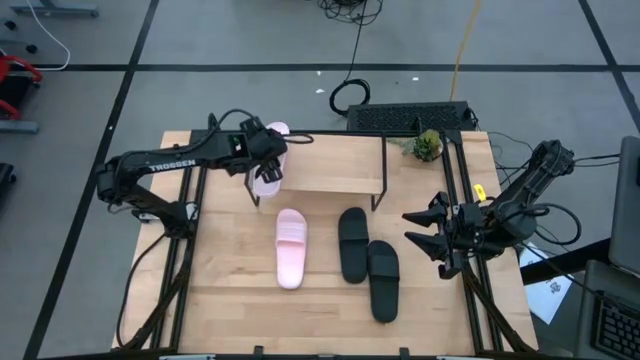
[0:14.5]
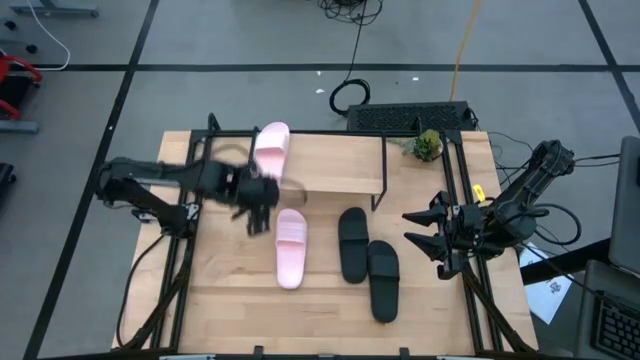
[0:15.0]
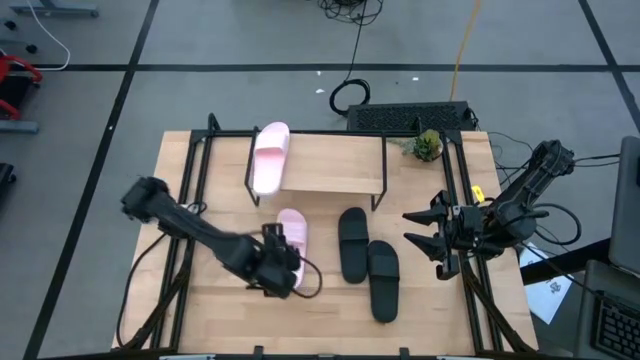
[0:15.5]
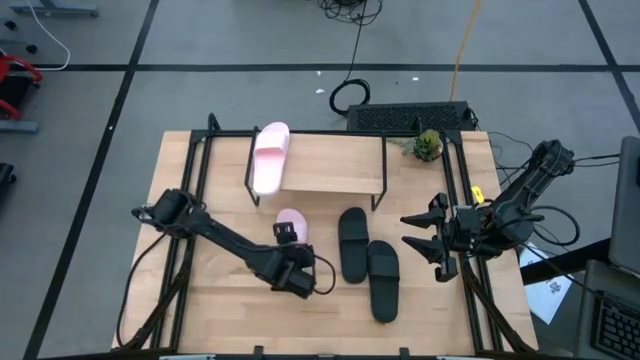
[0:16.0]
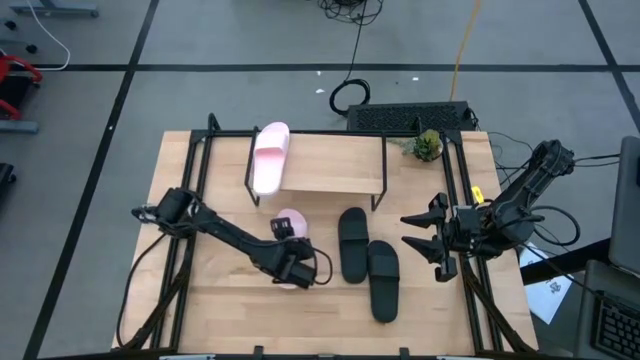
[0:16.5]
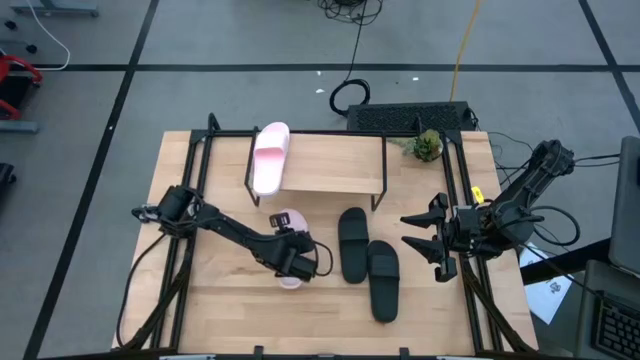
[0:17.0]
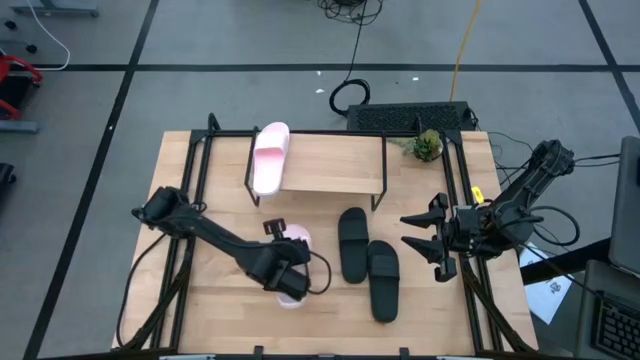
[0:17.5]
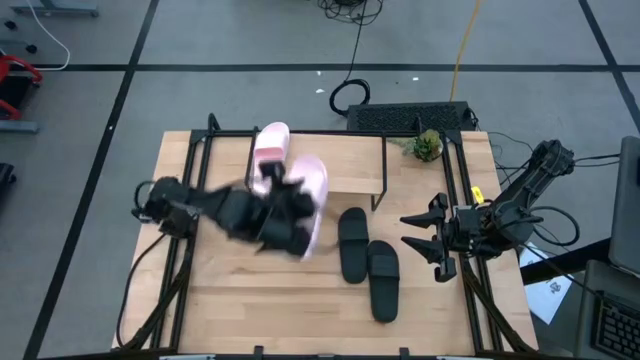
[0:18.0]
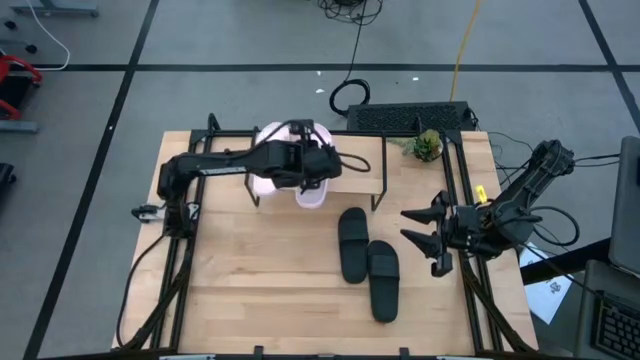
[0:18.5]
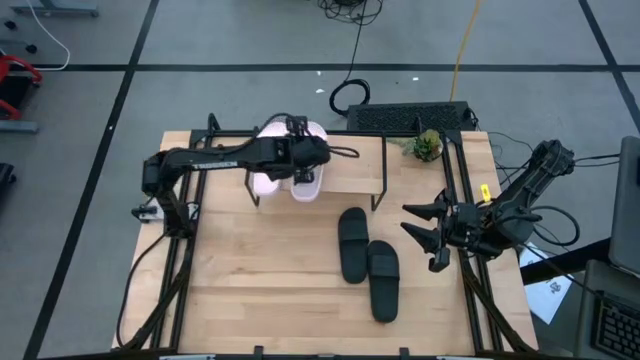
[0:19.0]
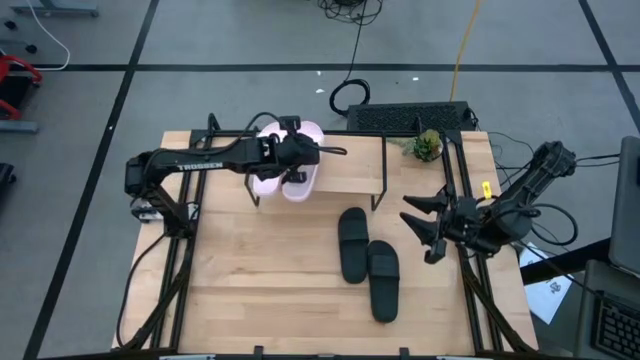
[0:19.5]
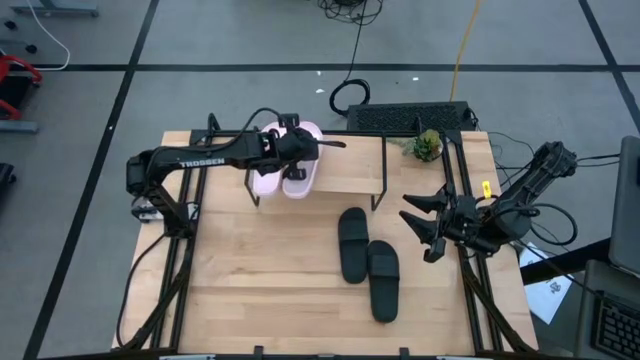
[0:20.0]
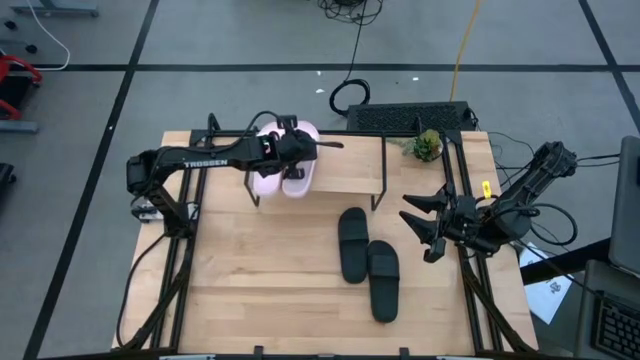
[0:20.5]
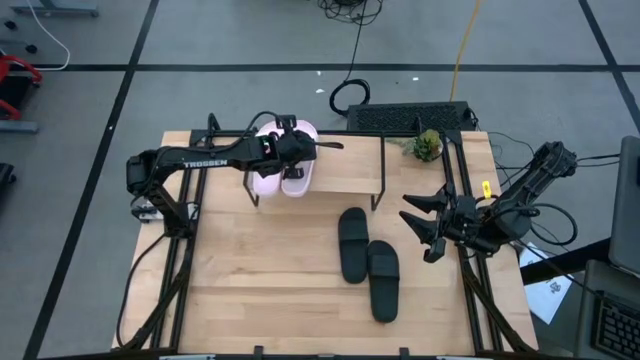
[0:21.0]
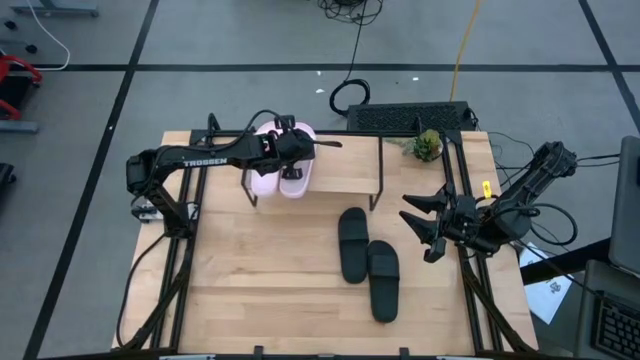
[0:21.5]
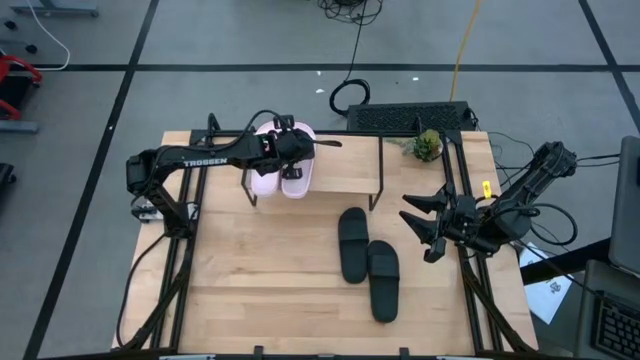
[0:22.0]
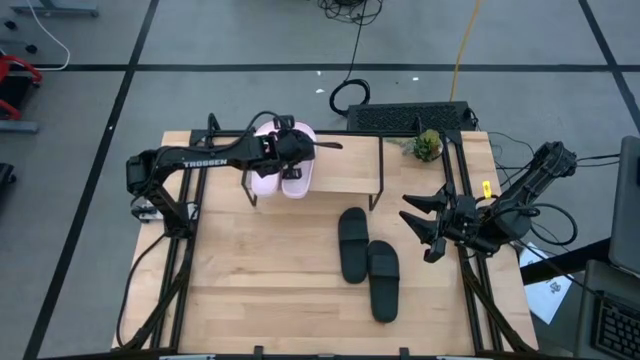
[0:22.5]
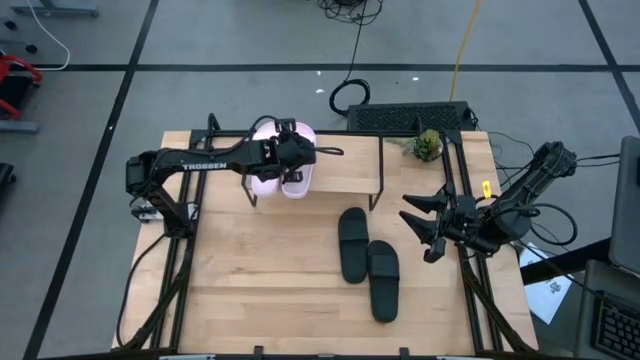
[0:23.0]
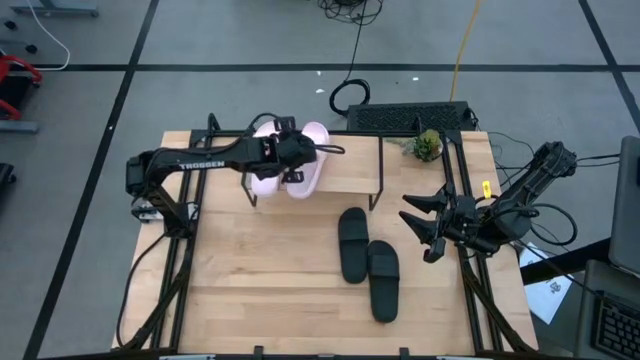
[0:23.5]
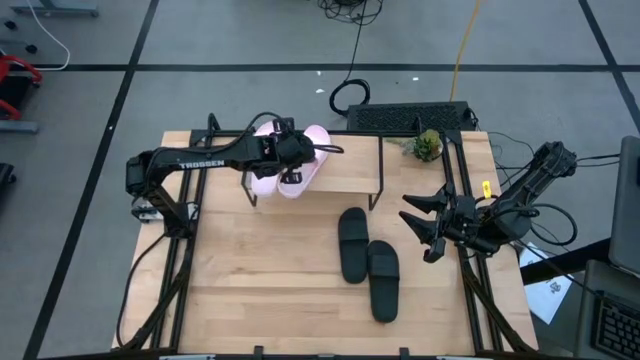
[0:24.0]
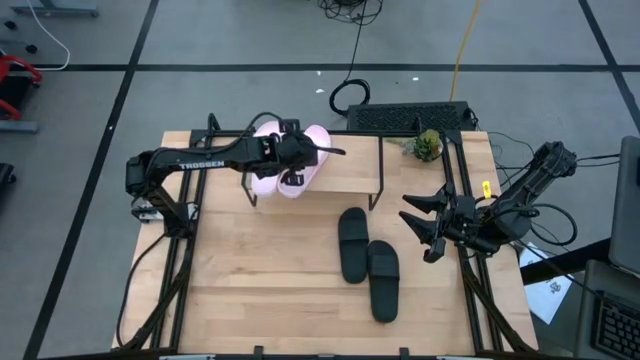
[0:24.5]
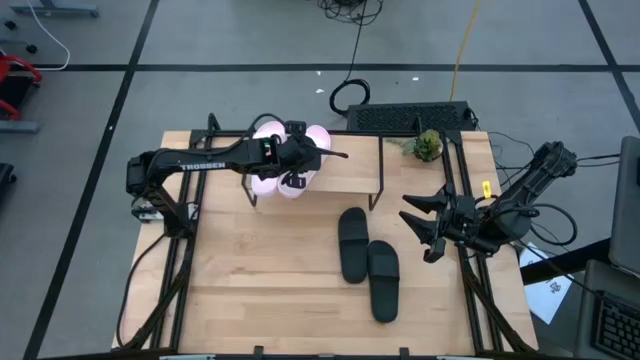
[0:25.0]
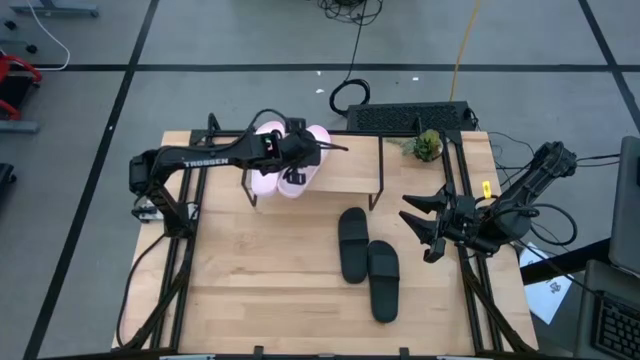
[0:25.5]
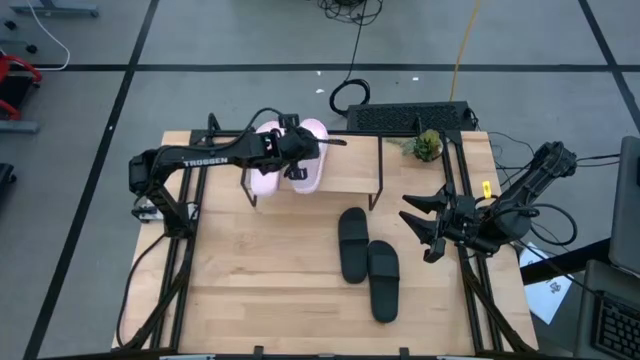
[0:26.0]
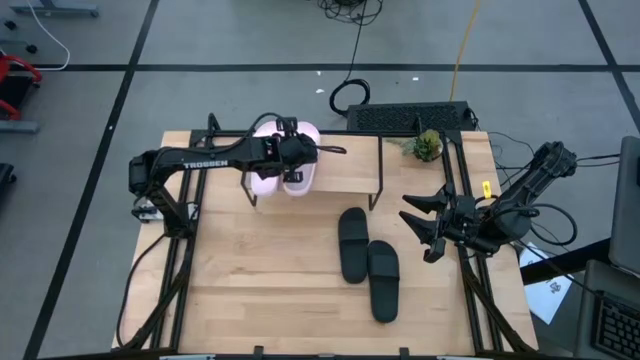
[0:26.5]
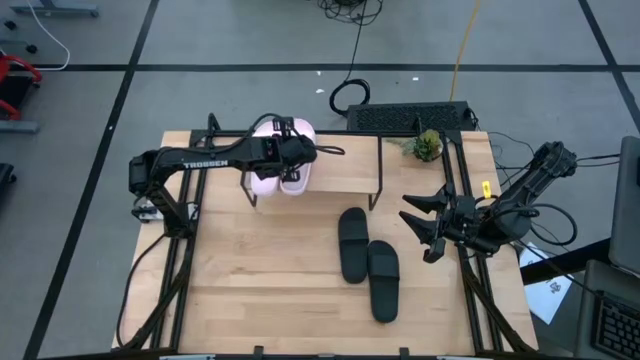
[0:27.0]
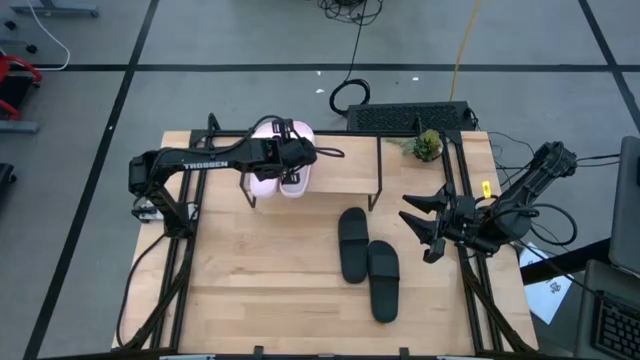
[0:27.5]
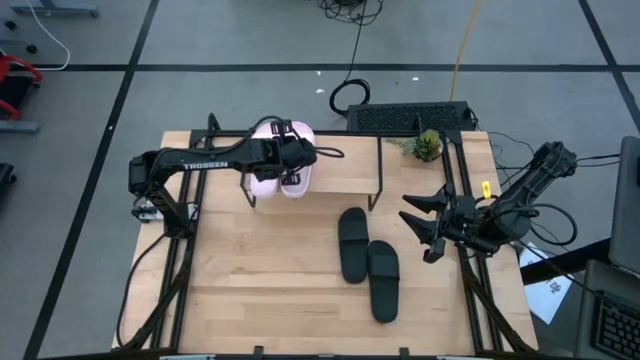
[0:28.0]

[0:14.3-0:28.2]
Task: Pick and place slides into the shelf
Put the pink slides on the shelf

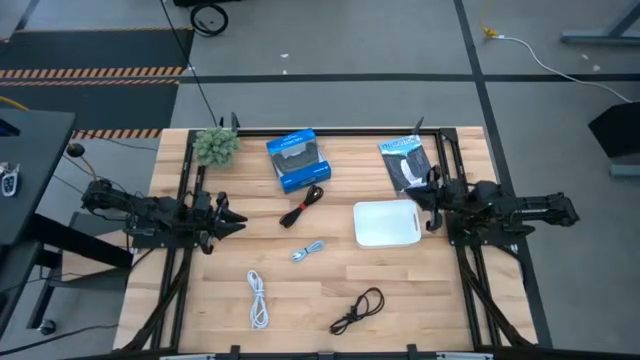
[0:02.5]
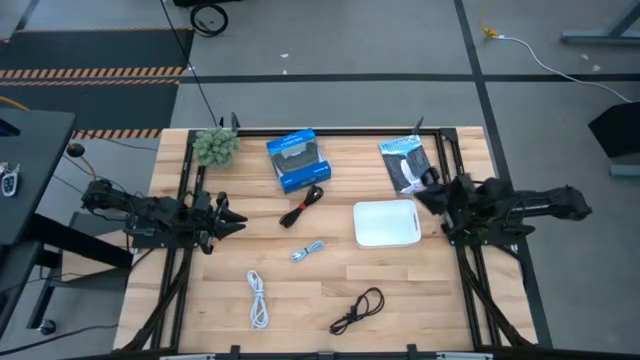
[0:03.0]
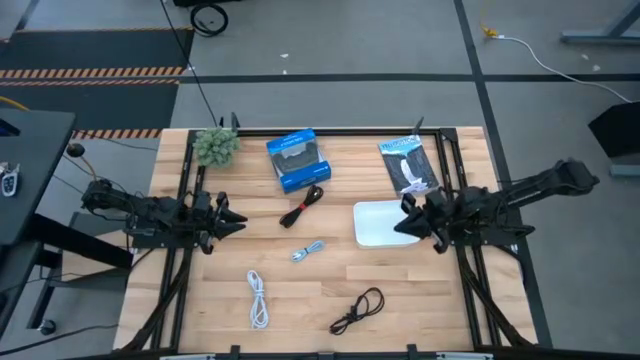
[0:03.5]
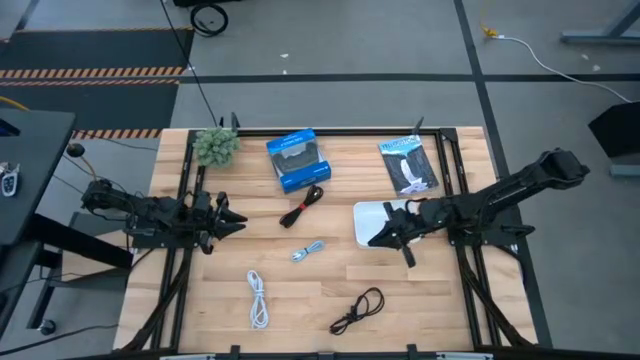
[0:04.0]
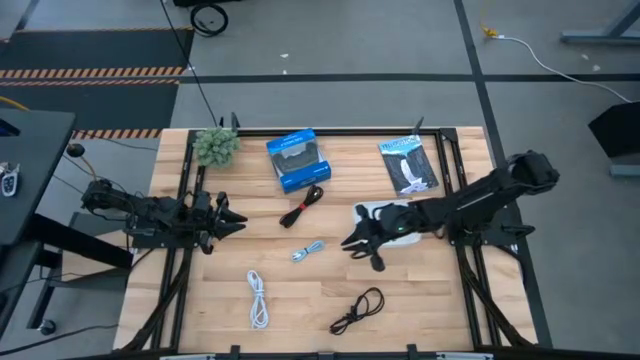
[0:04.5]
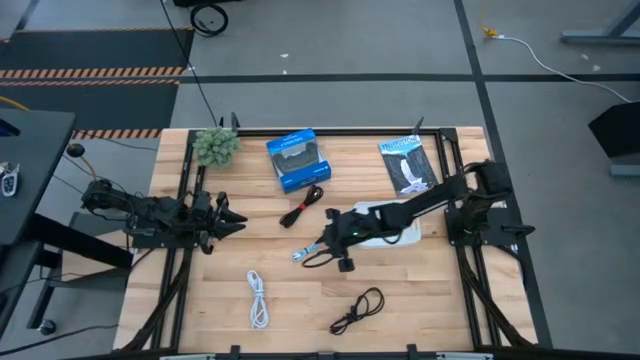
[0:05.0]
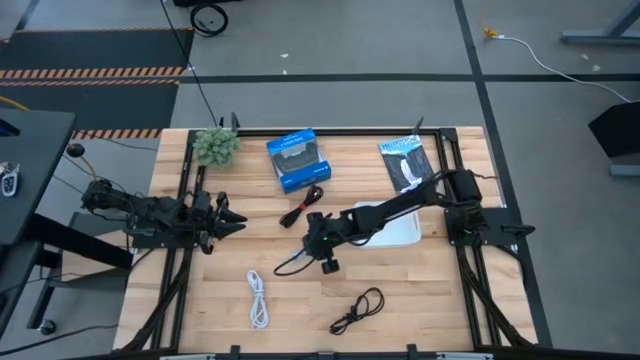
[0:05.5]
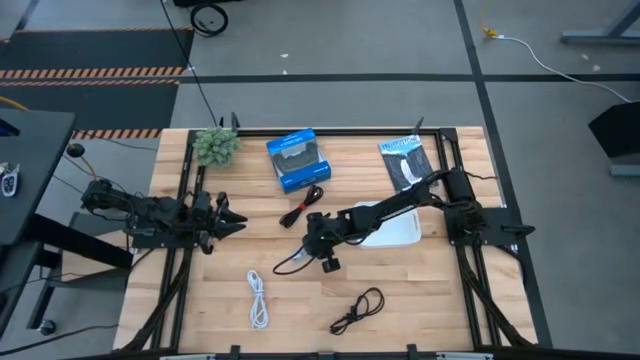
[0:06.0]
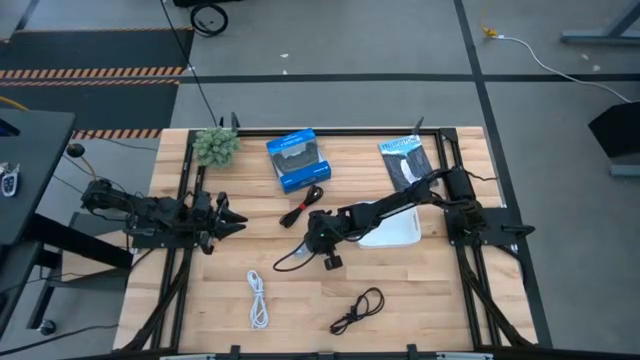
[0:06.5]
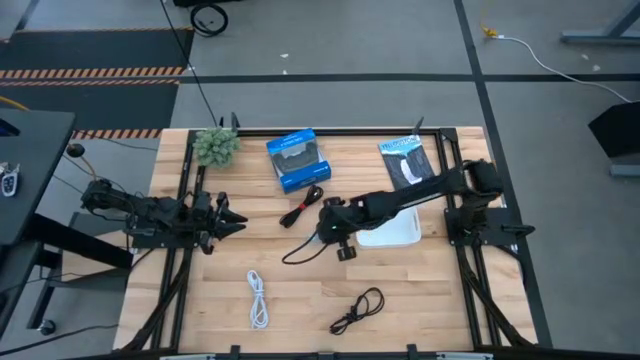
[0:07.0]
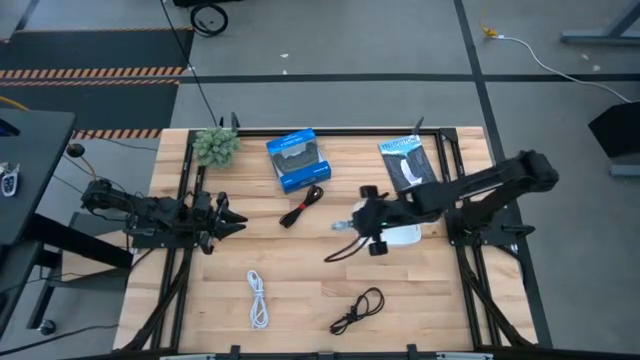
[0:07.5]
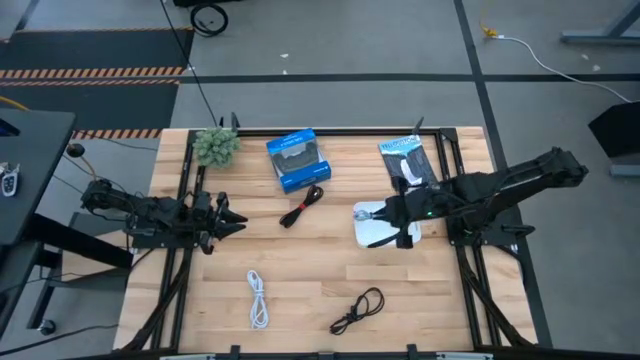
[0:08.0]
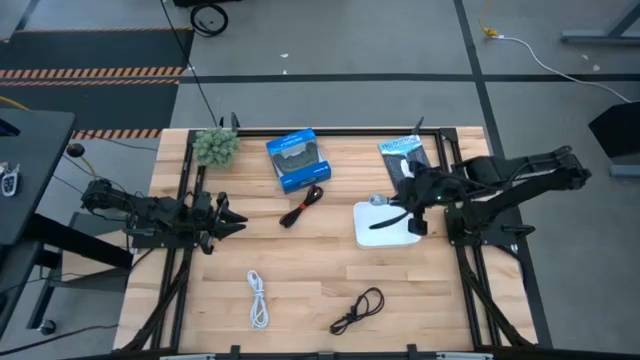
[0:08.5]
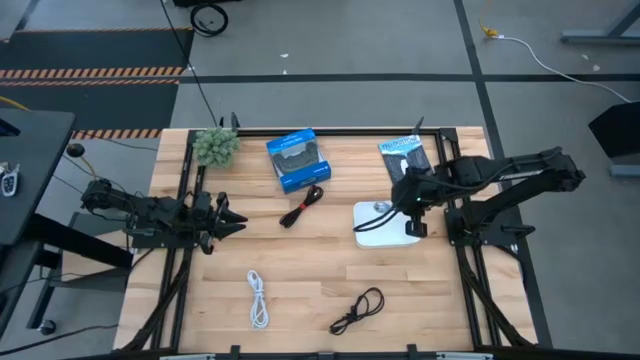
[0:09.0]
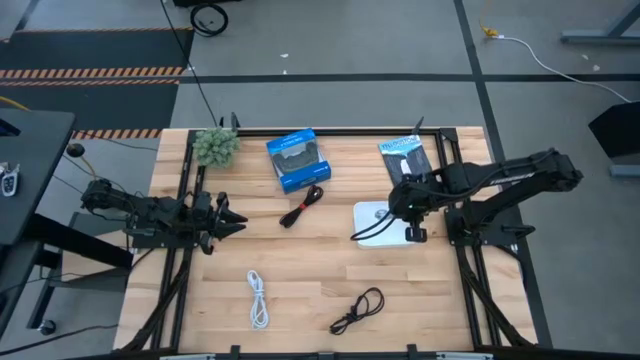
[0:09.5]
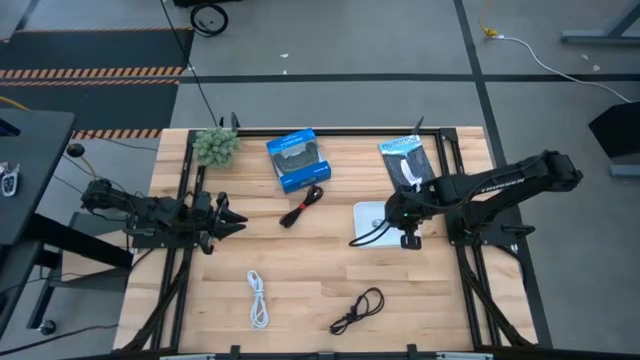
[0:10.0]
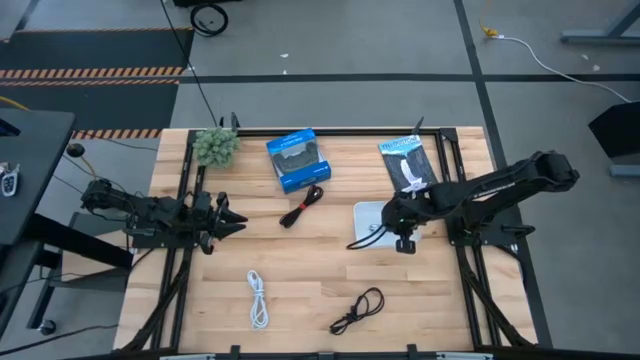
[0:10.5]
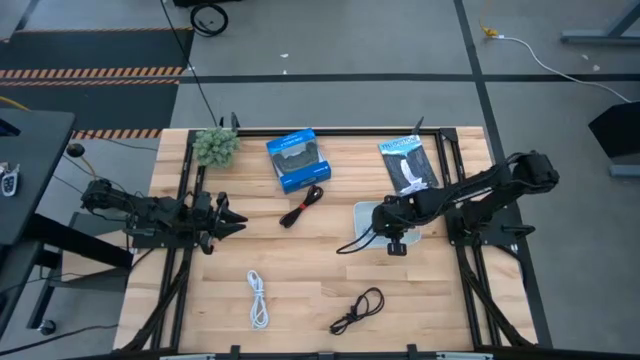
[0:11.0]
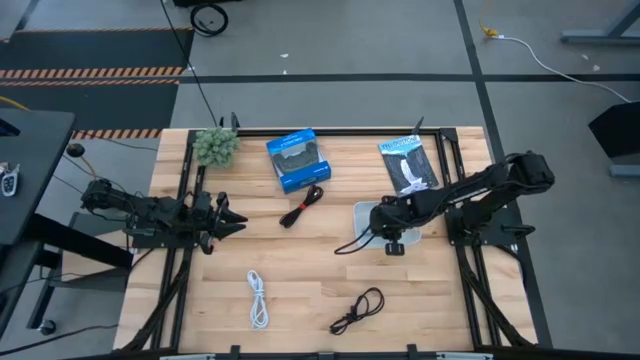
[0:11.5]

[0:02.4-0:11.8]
Task: Pick and place USB-C Cables
Put the gray USB cable into the white bin
